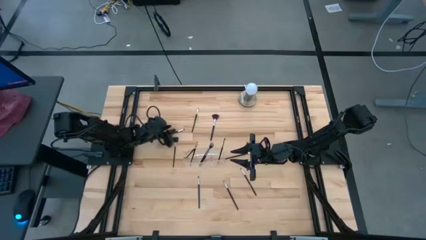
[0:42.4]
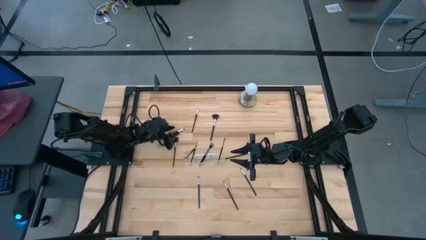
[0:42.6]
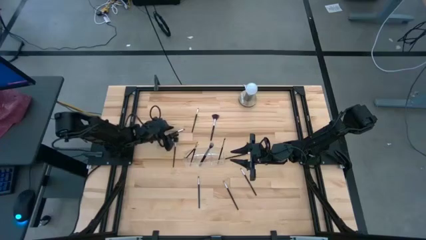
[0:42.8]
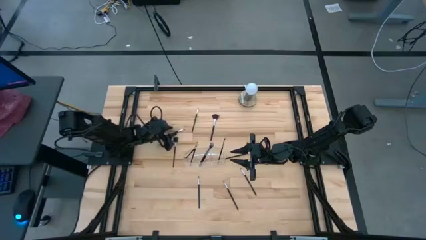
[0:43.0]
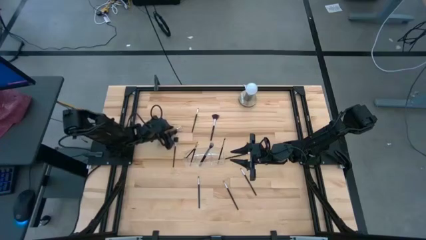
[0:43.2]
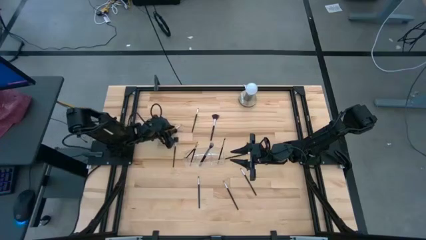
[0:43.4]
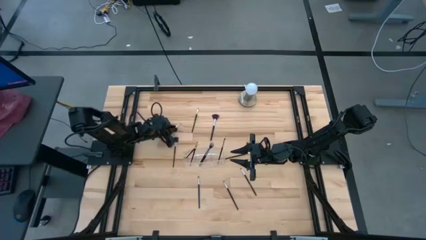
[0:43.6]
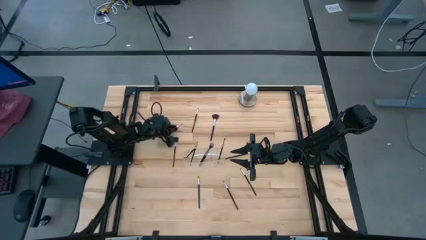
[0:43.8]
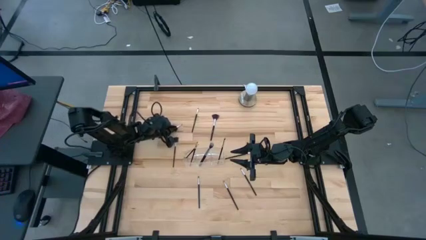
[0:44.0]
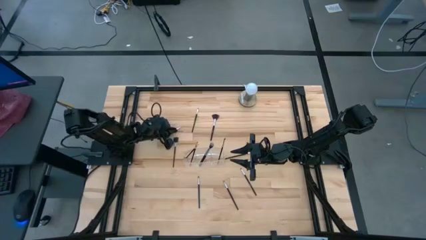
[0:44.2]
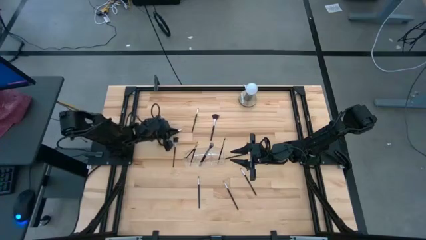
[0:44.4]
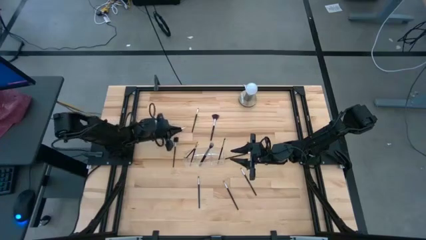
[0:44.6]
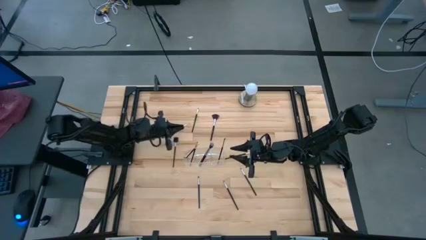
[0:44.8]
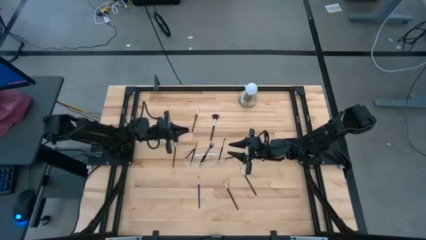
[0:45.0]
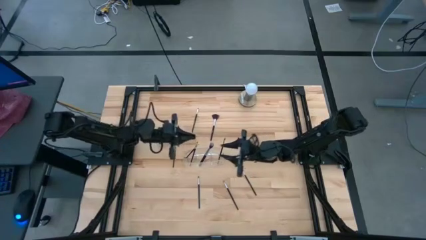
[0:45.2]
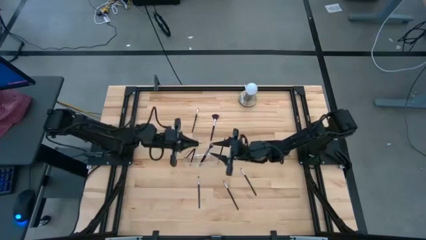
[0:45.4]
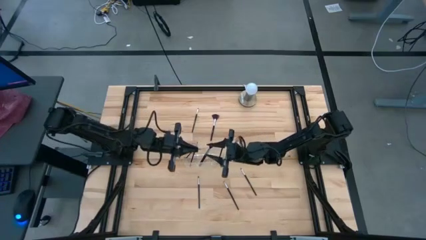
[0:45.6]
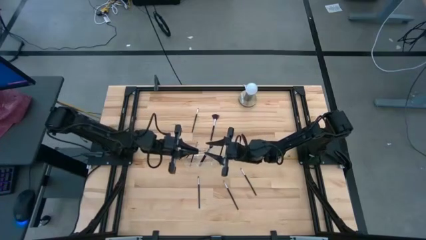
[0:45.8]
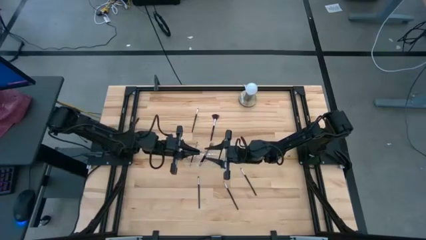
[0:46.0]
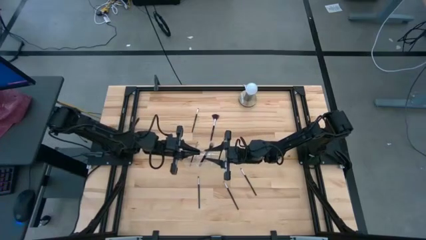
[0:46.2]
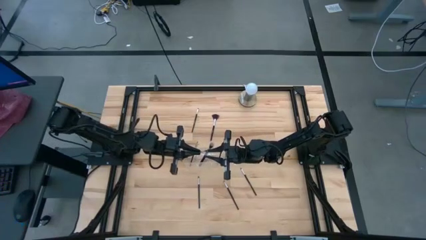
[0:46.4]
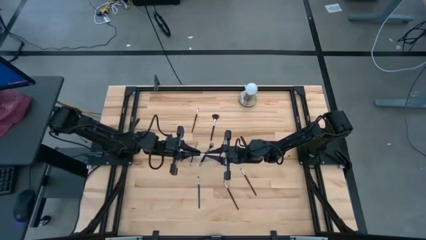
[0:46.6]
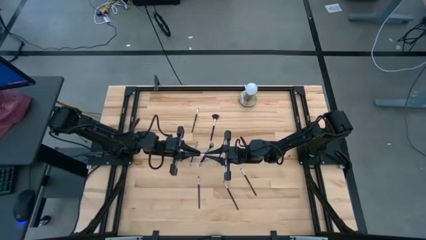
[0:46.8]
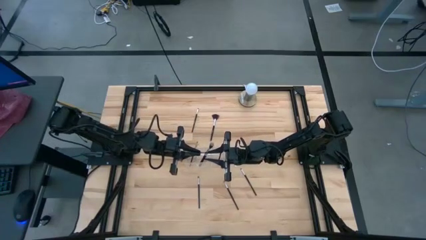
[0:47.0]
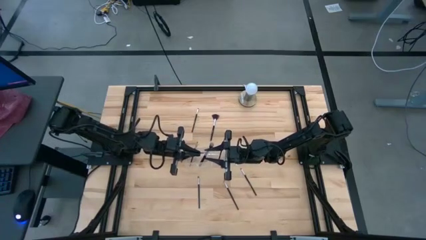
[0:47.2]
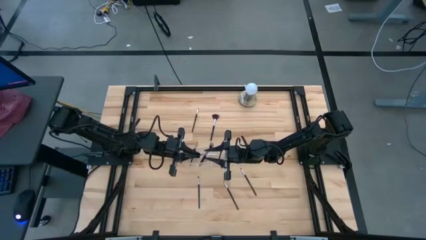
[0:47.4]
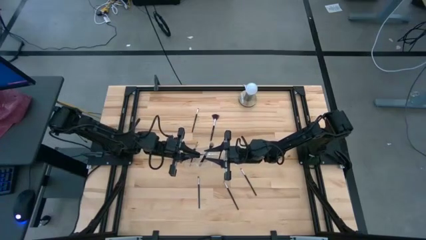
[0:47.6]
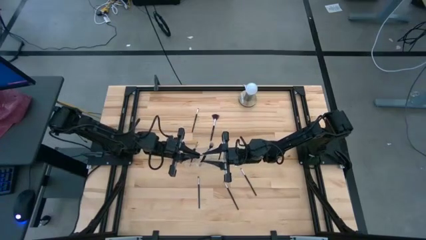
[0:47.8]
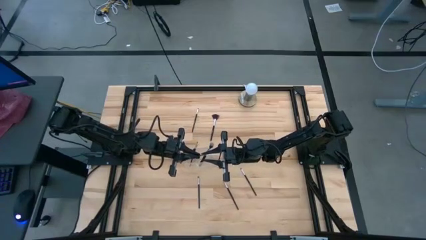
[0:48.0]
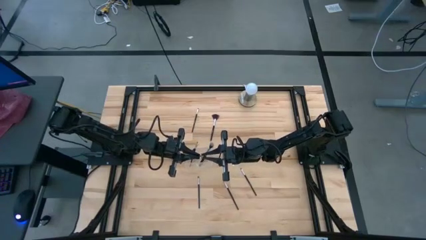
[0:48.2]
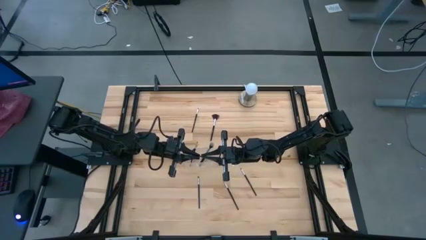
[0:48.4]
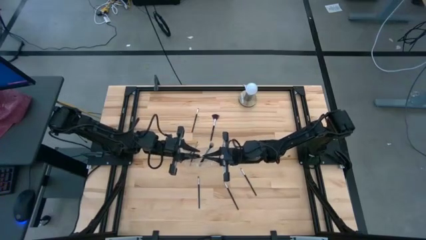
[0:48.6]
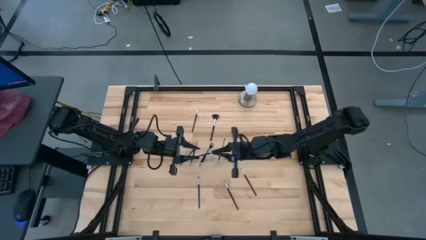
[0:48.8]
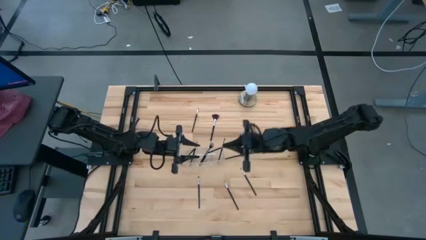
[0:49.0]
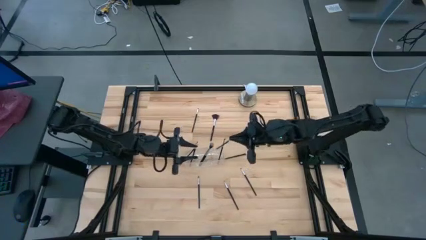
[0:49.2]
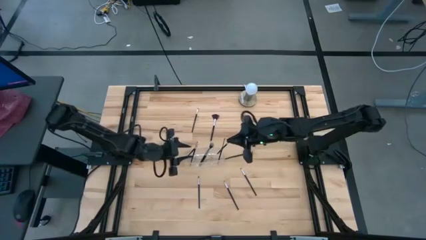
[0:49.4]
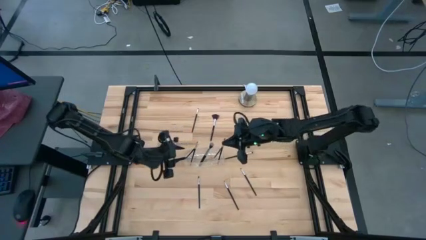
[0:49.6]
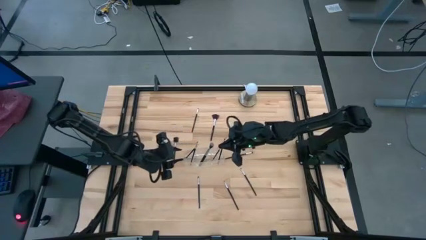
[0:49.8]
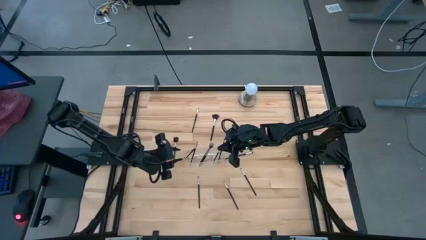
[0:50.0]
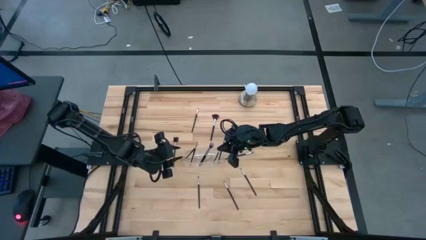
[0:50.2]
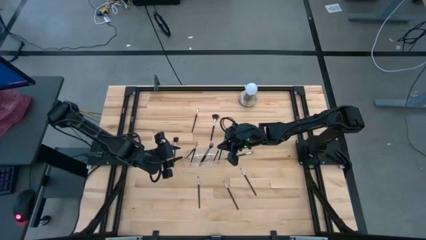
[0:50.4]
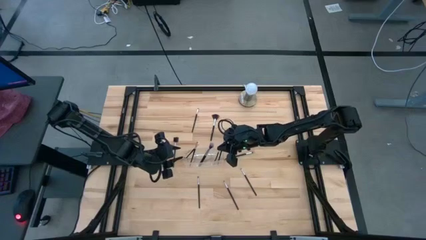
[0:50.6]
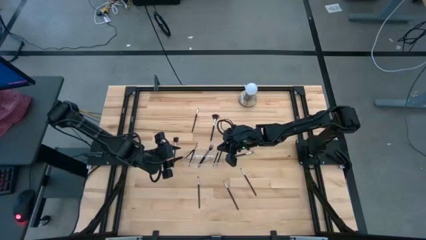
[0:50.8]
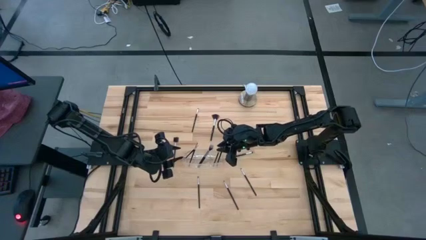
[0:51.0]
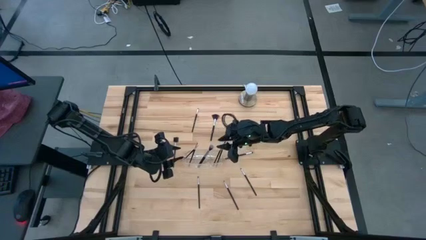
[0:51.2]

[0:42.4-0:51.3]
Task: Put items in baskets/containers
Put the eyeshadow brush into the transparent organizer

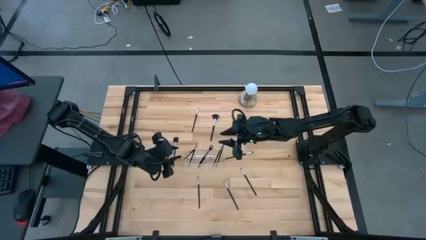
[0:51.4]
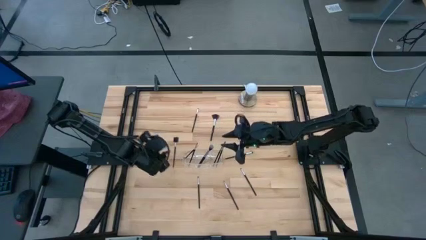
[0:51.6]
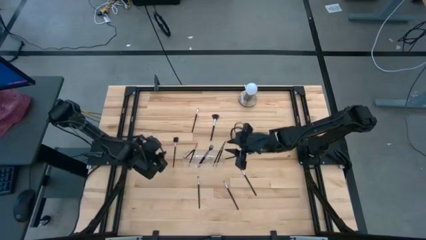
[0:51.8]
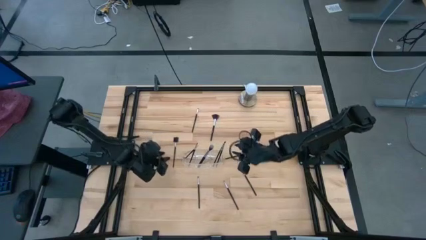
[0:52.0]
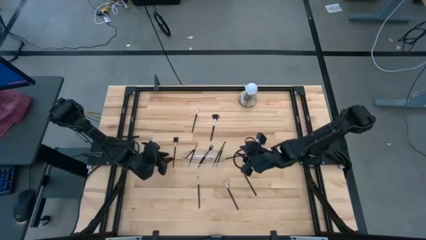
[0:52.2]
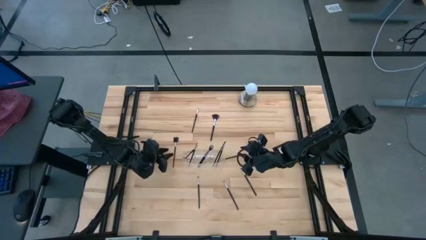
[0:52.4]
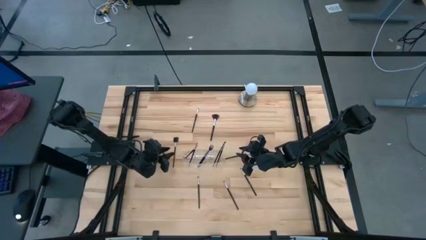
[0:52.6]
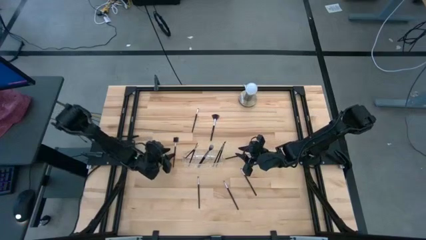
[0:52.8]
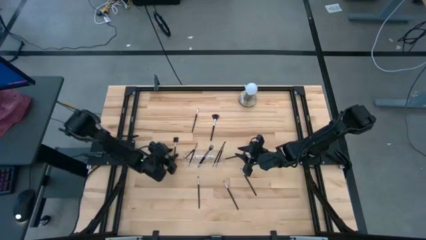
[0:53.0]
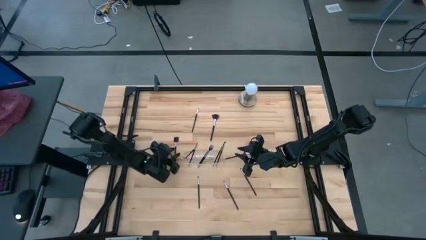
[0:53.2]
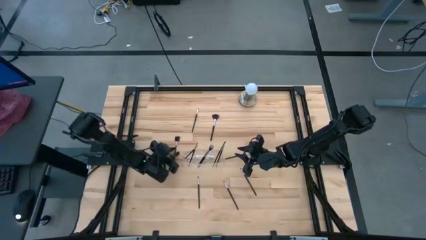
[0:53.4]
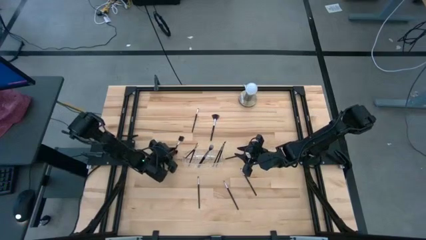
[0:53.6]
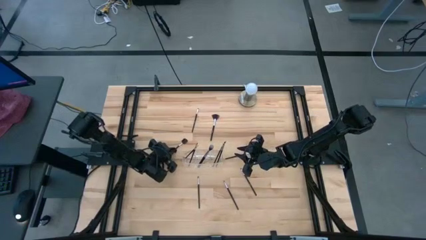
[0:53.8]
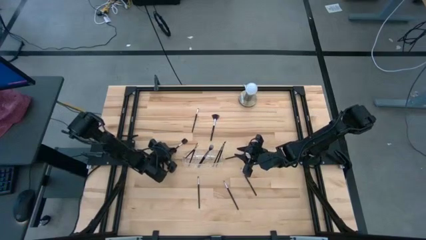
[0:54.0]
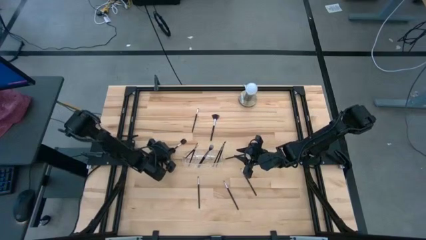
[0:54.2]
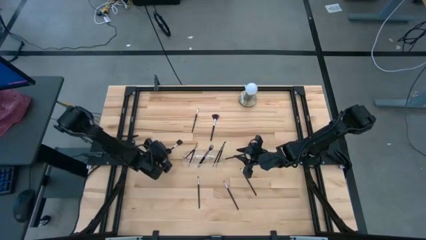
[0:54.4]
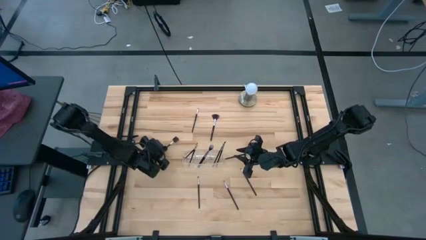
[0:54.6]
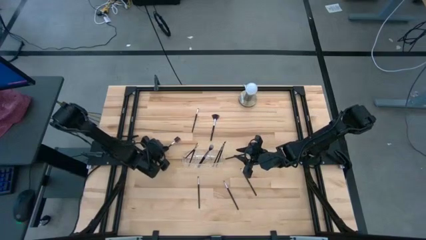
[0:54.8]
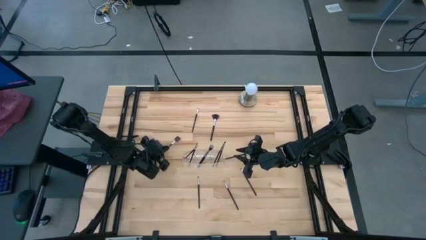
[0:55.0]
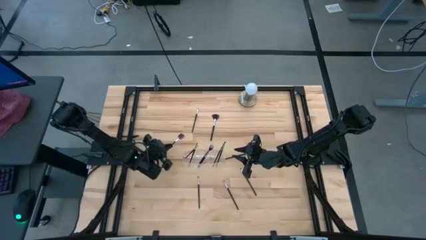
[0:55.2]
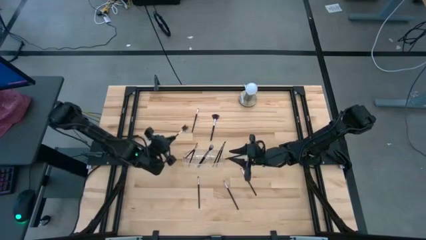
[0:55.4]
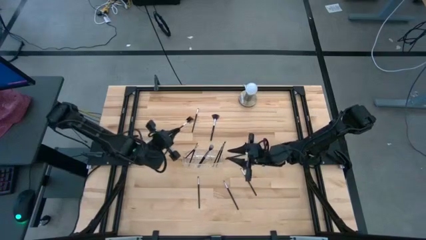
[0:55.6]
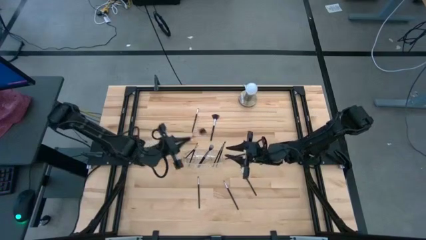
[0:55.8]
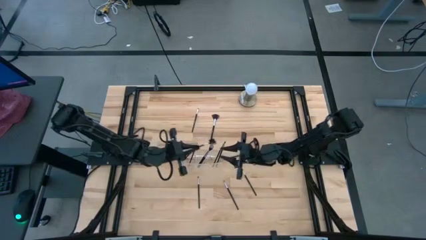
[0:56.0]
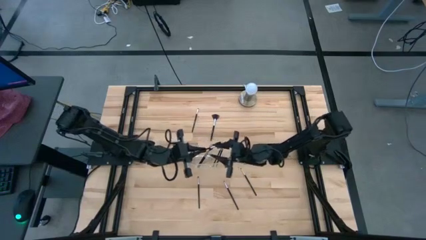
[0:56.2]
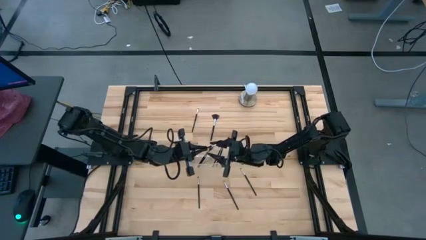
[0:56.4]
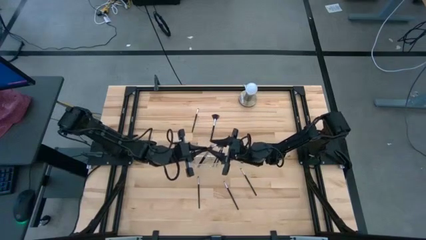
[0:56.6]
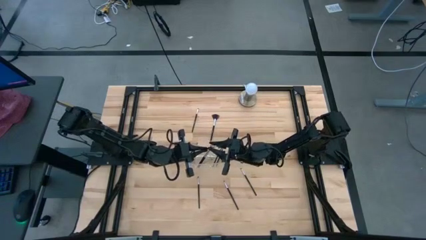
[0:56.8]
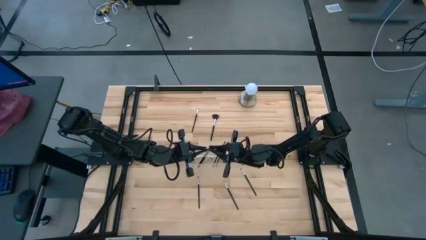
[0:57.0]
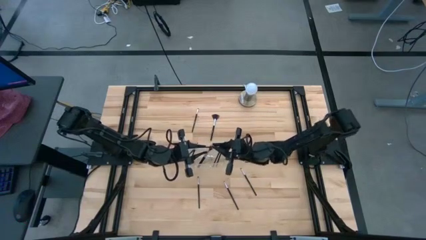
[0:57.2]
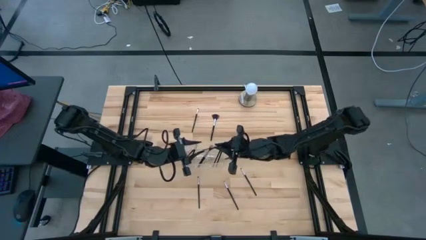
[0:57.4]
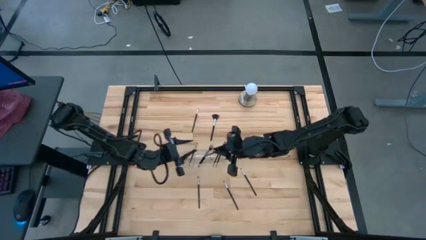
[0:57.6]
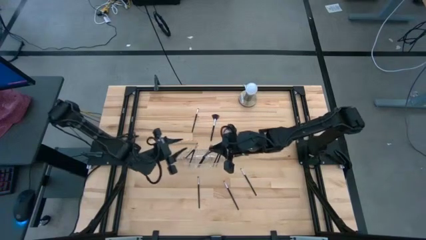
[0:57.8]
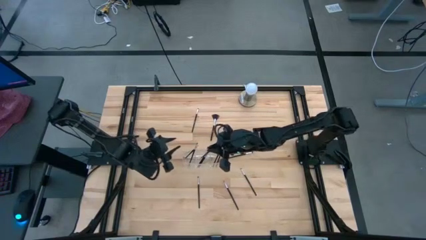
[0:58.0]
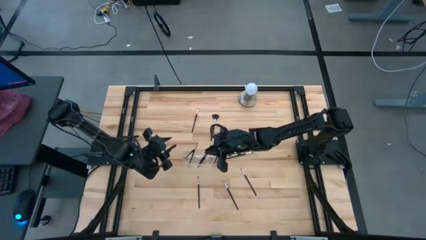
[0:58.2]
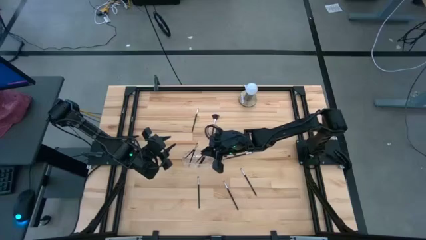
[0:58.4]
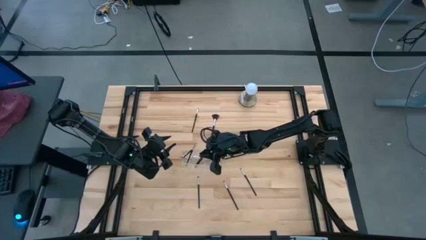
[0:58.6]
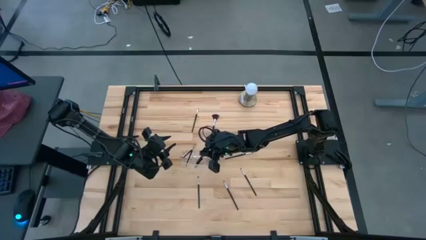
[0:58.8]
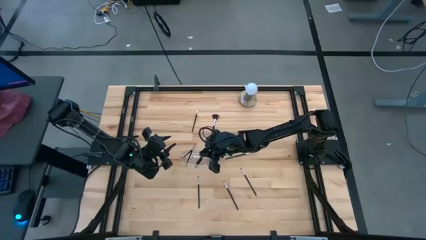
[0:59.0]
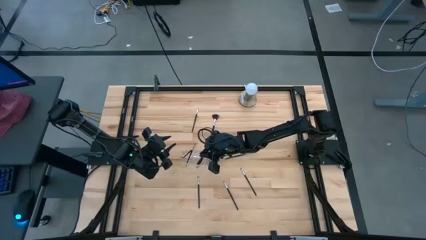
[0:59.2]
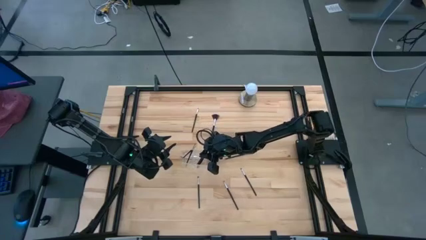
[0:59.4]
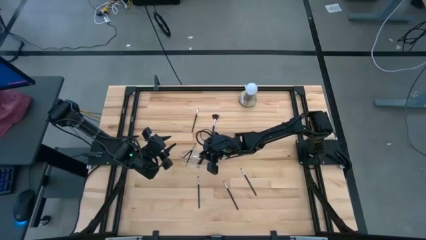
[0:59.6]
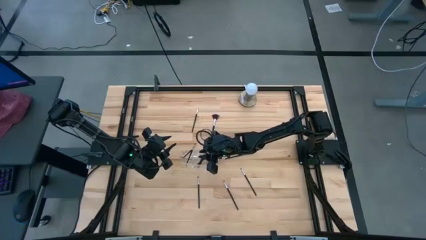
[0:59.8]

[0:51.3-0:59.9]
Put the brow brush into the transparent organizer
